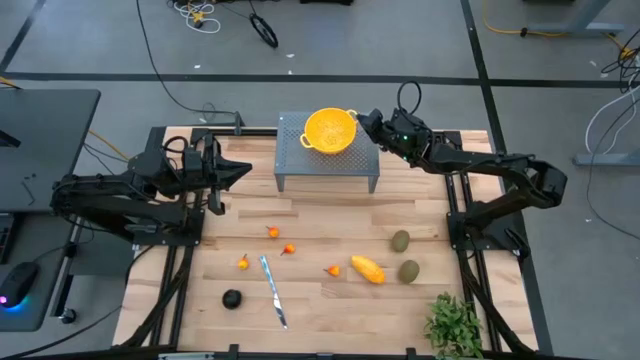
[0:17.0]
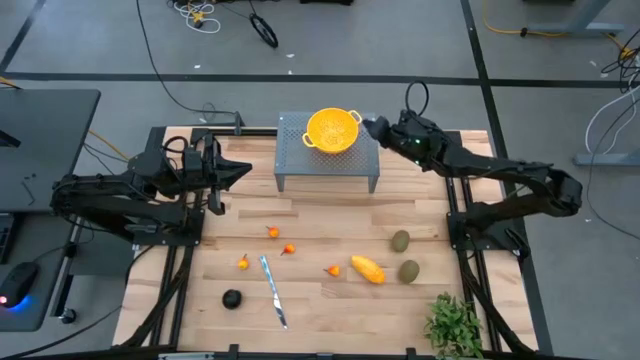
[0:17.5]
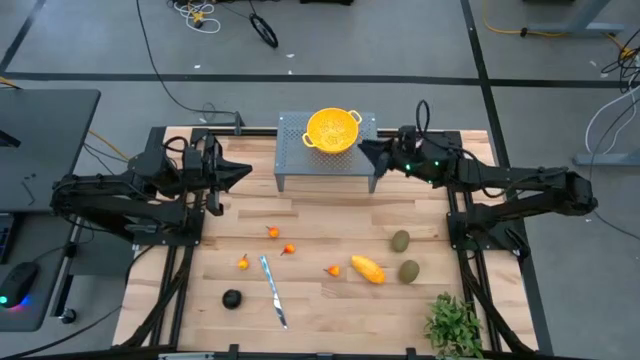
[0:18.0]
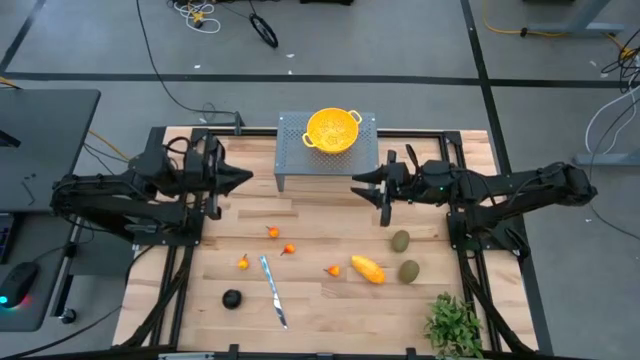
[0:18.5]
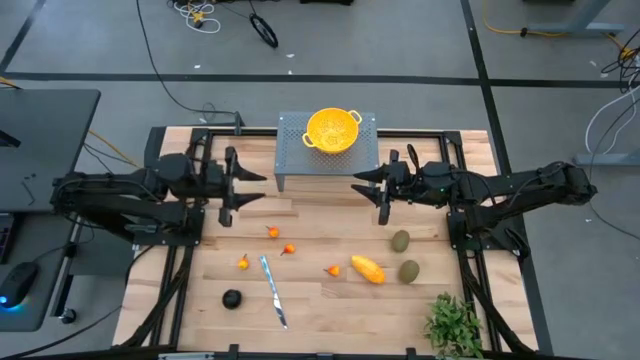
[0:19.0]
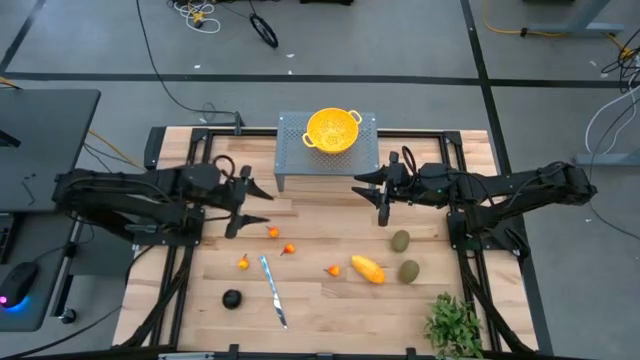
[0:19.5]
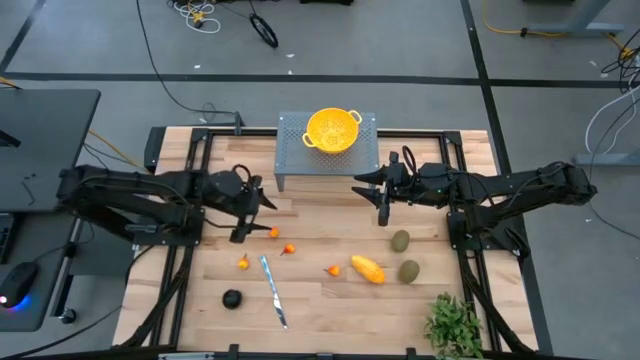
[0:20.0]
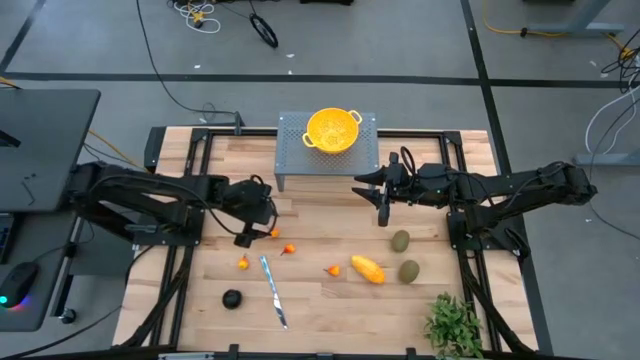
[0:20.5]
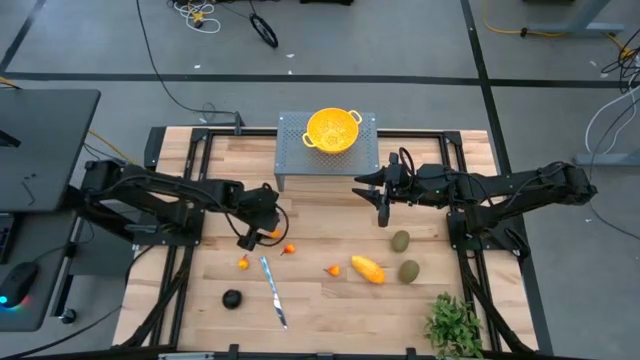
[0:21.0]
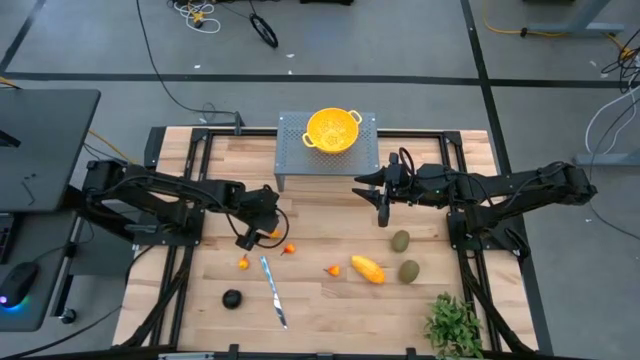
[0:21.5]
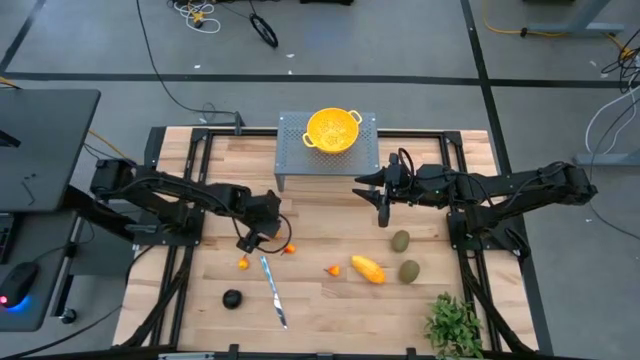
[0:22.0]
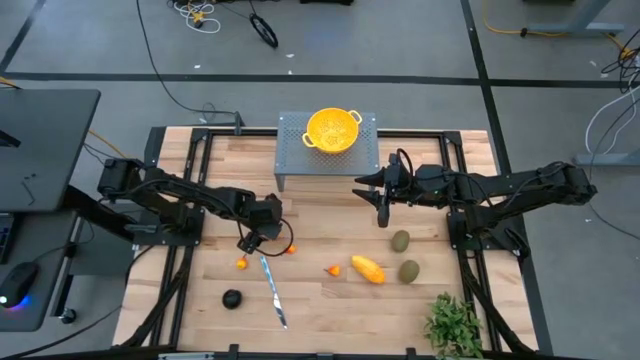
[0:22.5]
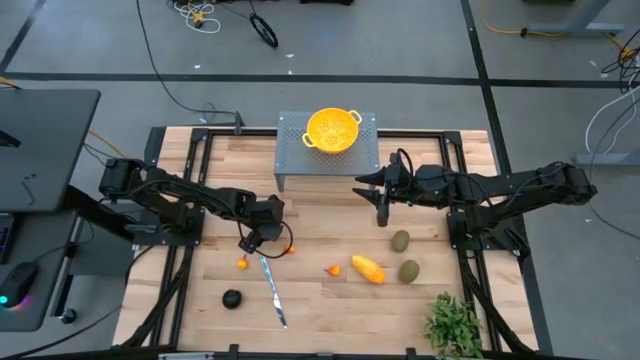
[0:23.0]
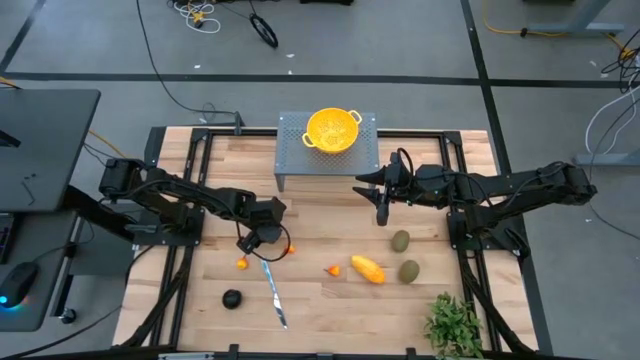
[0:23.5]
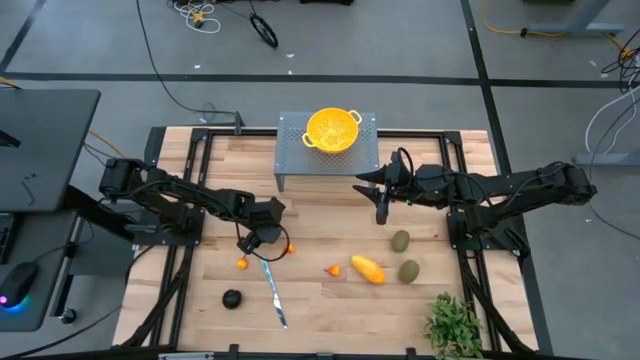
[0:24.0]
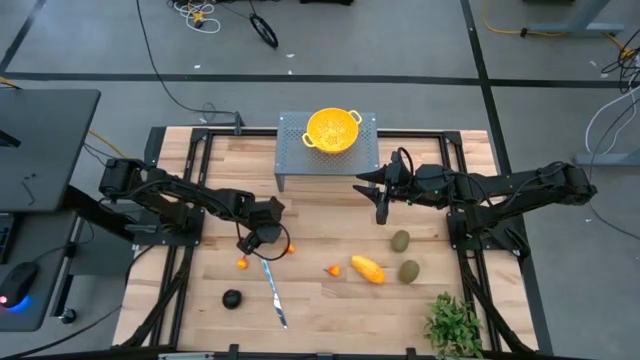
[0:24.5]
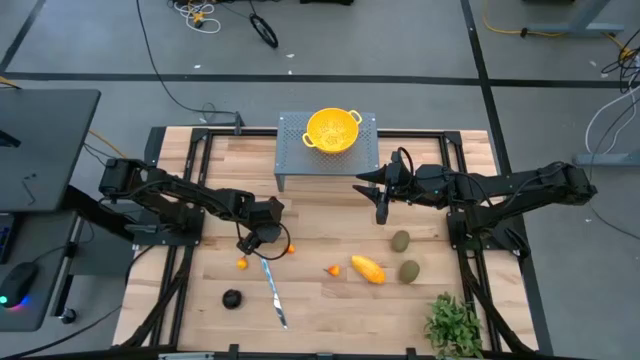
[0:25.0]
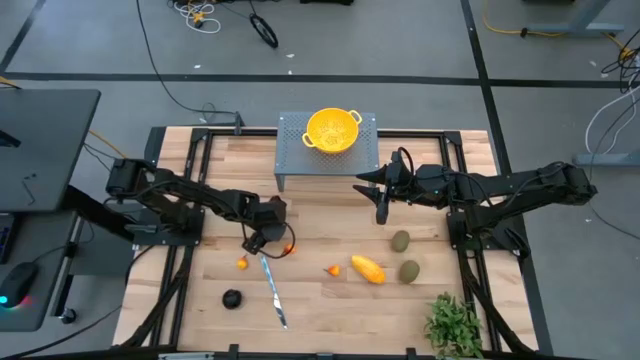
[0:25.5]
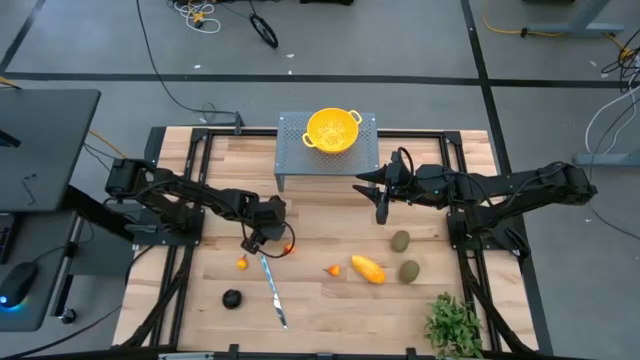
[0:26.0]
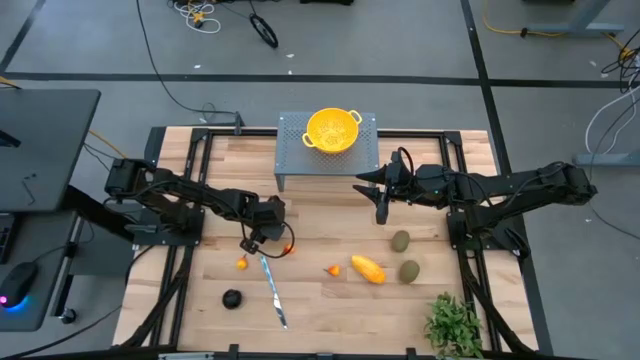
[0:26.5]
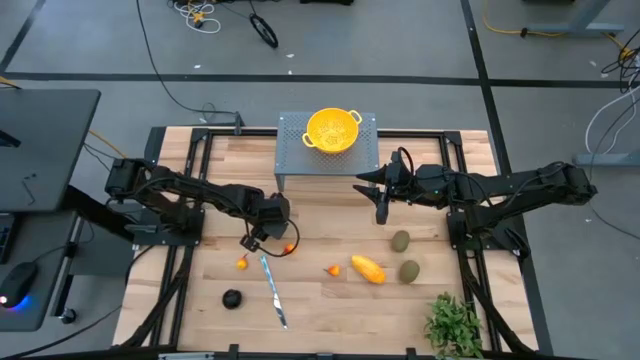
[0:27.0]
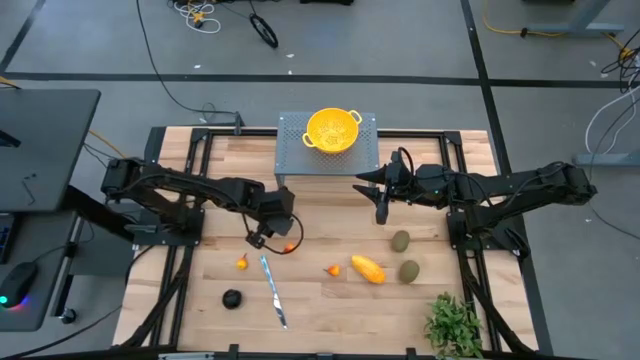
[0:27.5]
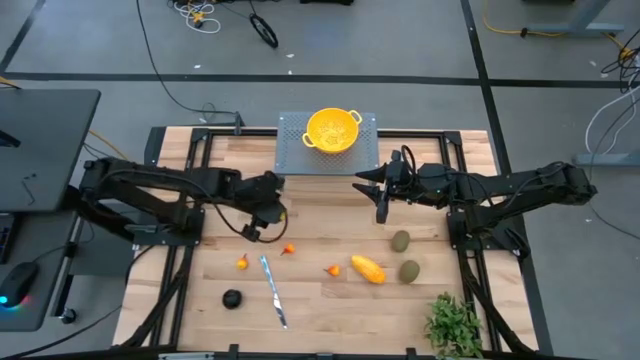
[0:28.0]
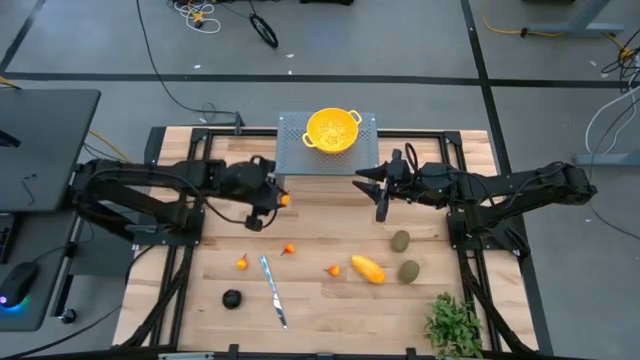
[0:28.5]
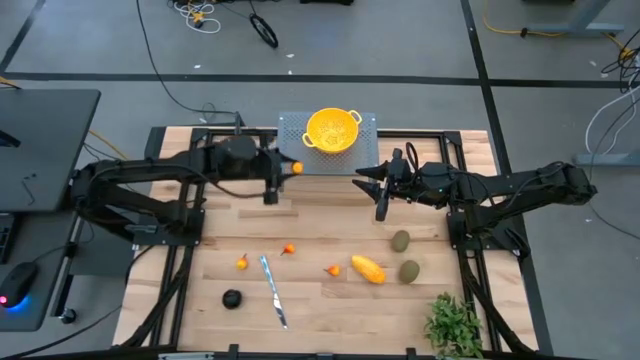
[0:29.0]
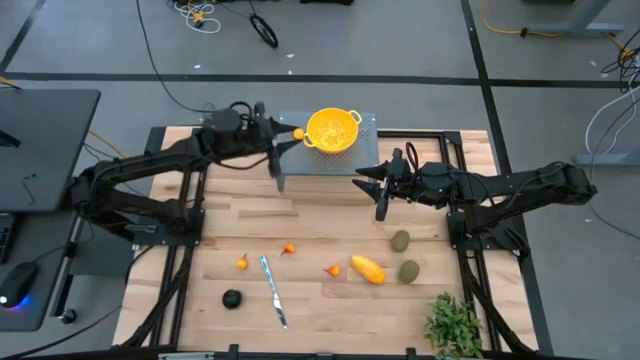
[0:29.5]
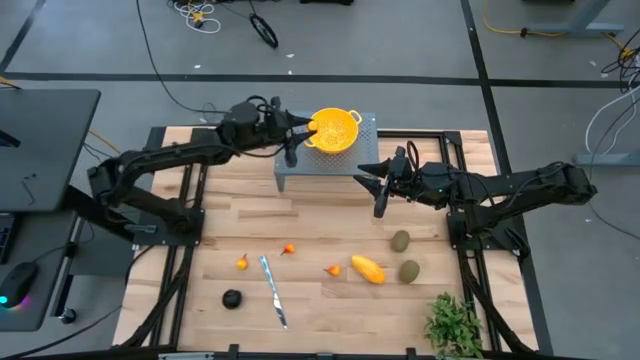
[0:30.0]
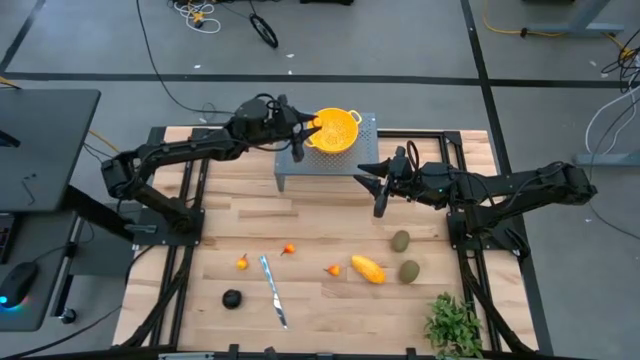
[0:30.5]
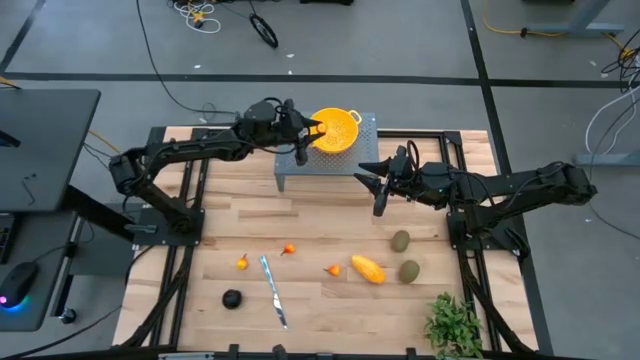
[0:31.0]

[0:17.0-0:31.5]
Task: Pick & Place Fruit
Put the pear into the yellow colander bowl on the shelf

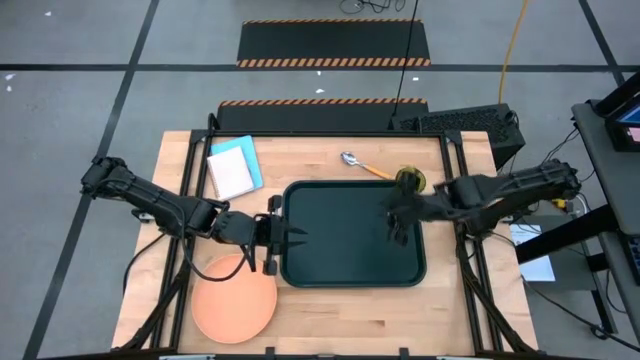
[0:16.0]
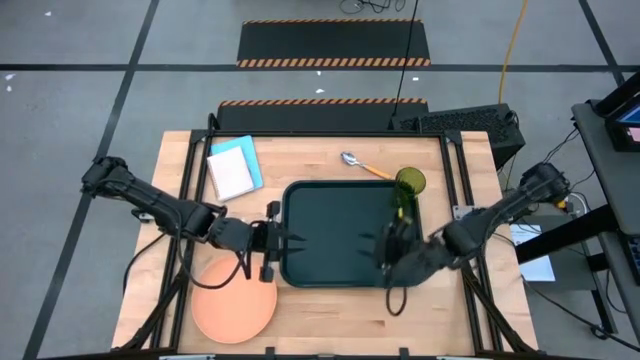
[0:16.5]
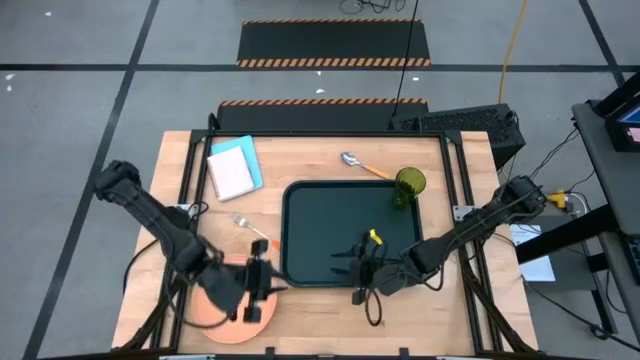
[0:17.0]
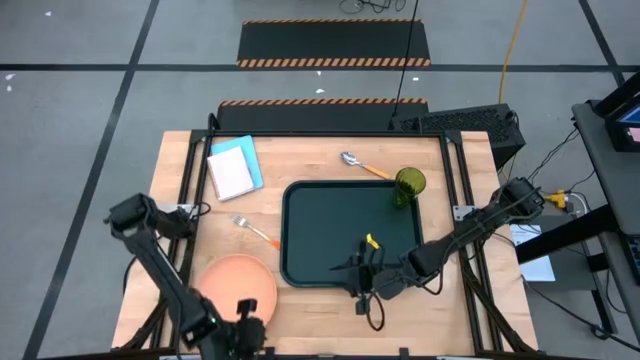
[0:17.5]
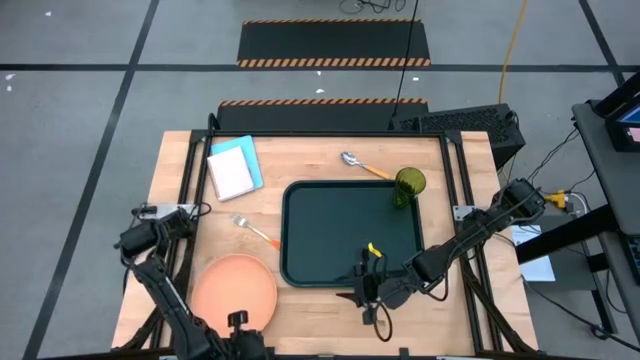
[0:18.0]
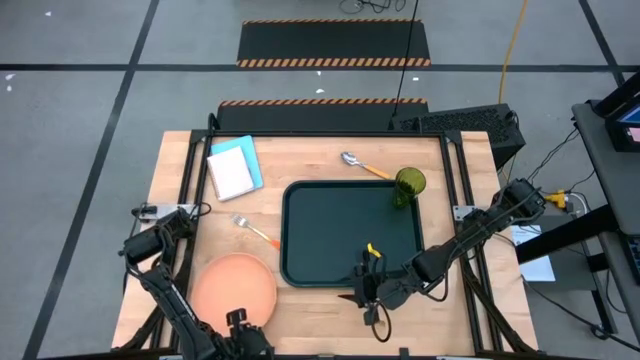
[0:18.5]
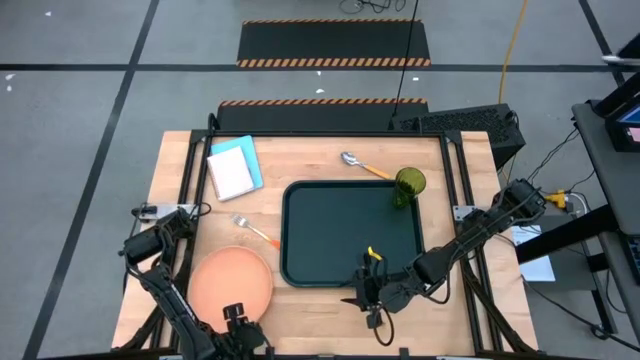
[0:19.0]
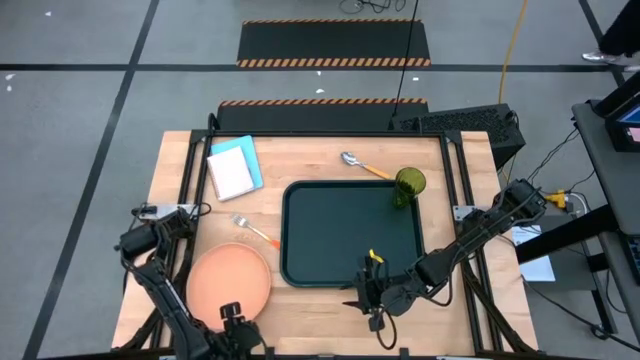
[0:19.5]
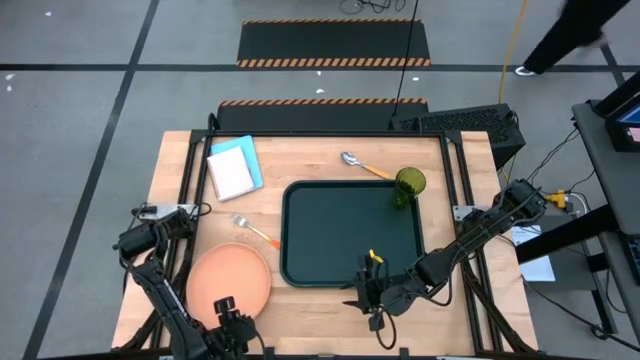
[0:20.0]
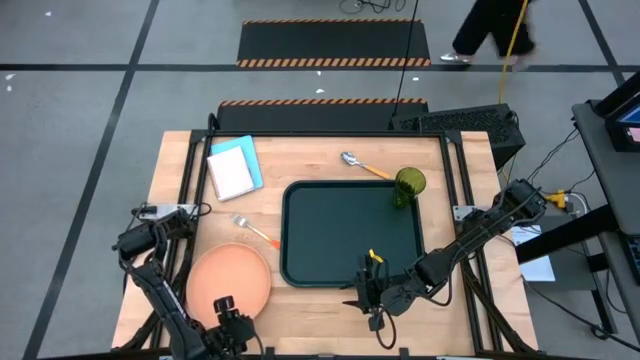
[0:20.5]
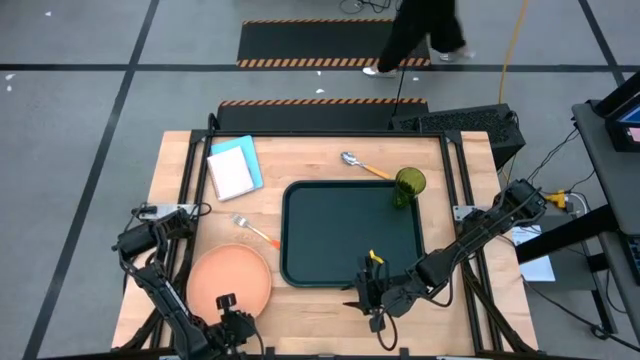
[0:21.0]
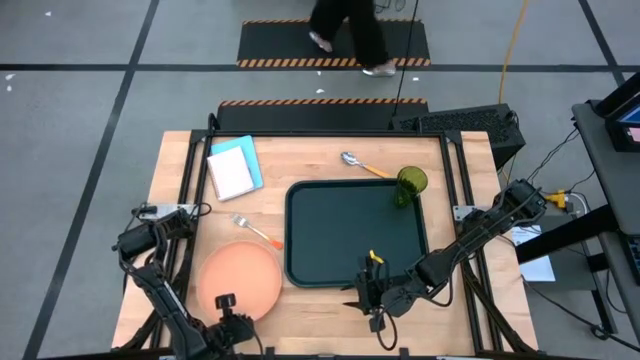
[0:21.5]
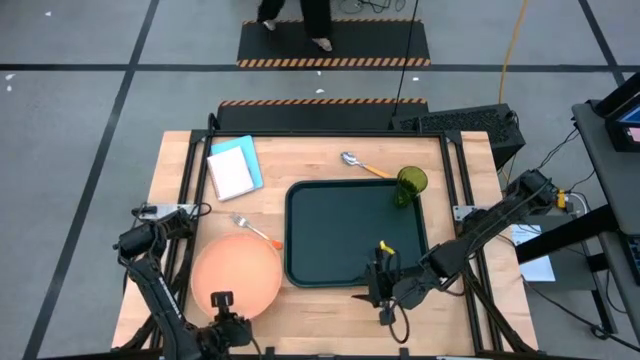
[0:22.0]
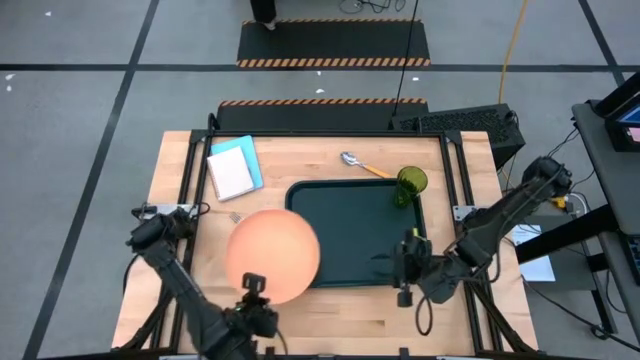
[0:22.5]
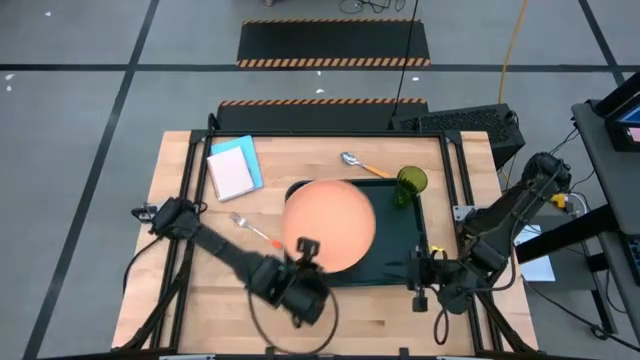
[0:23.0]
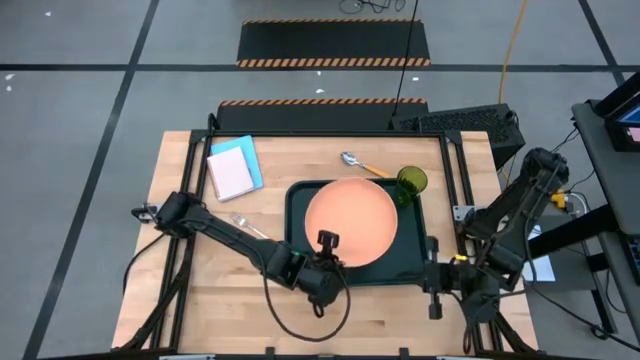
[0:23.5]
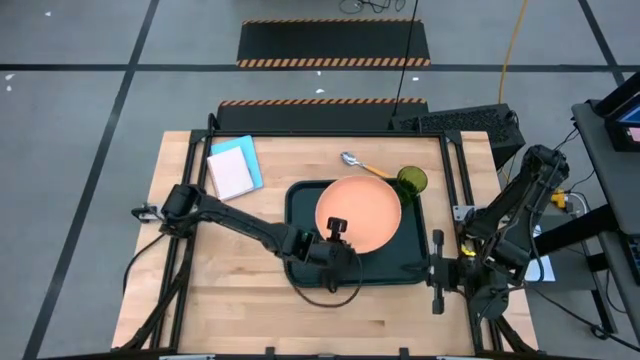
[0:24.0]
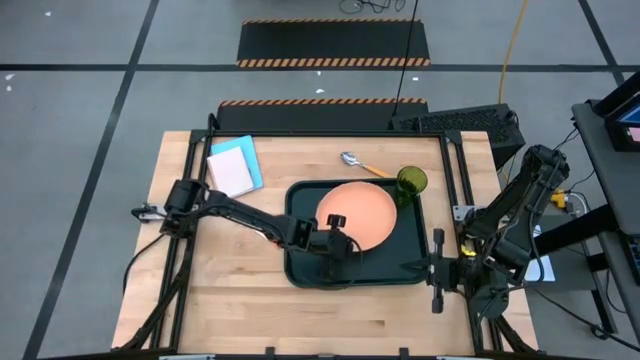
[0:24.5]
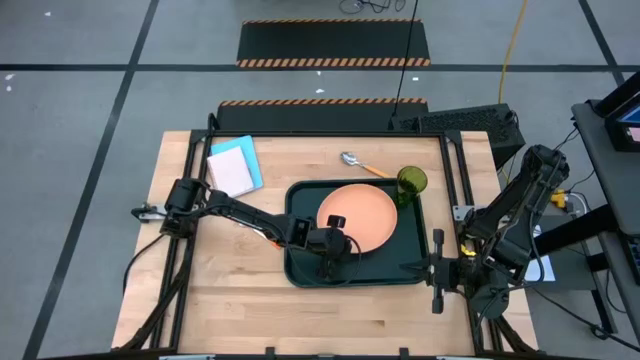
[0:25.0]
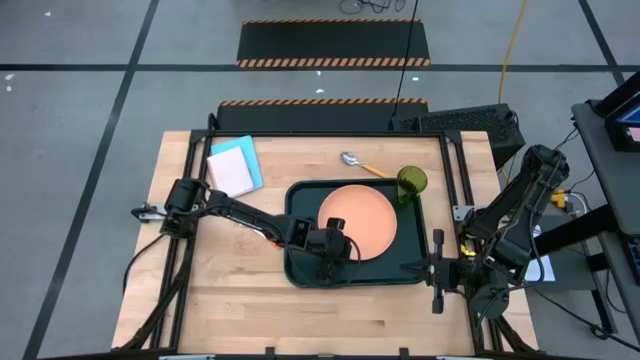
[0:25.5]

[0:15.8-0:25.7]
Task: Pick and place plate/cup/fork/spoon on tray
Put the orange plate on the green tray
